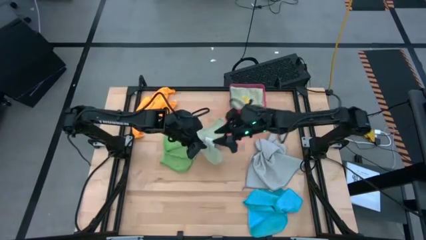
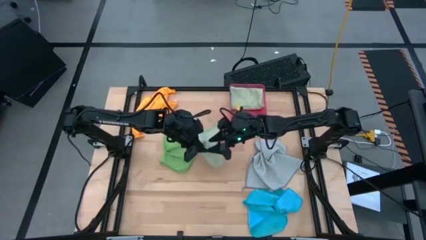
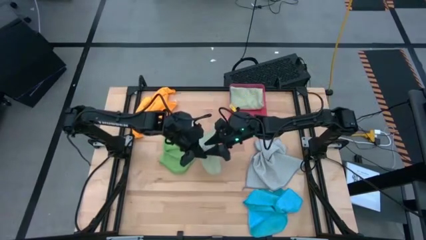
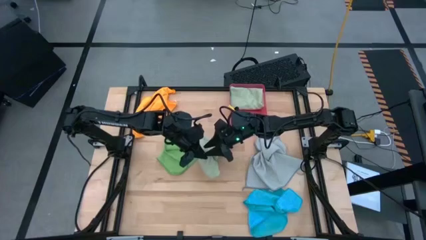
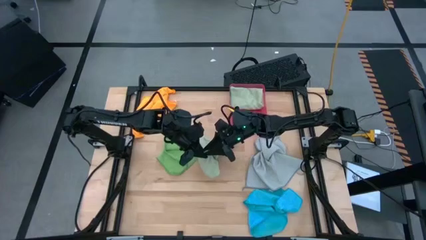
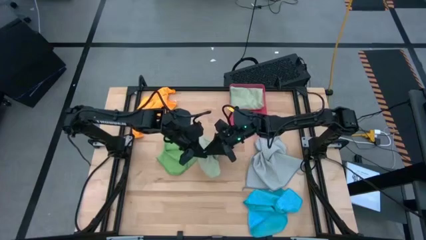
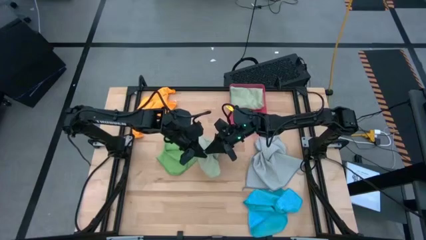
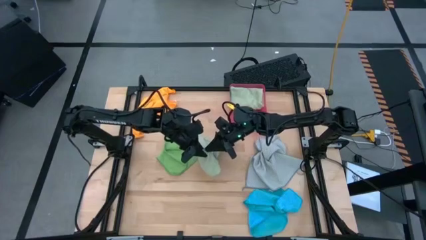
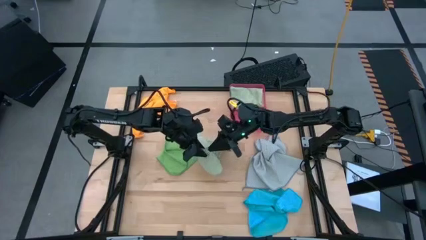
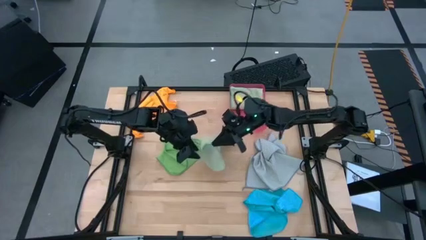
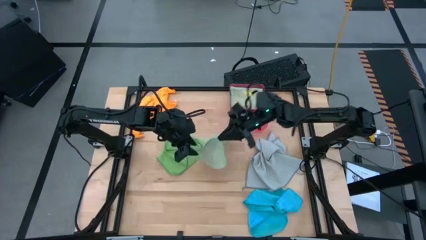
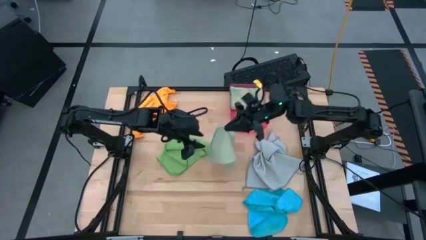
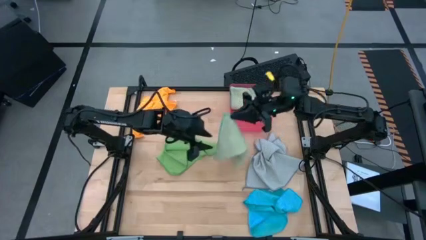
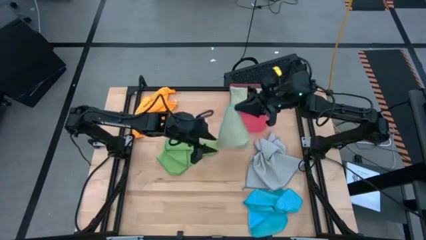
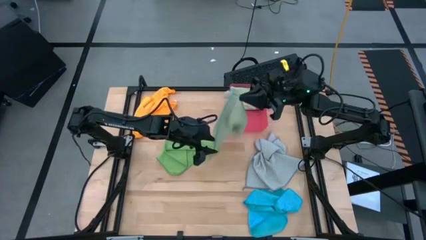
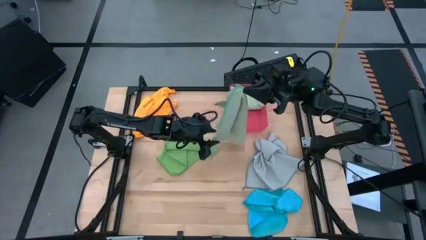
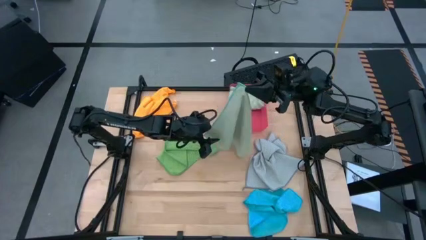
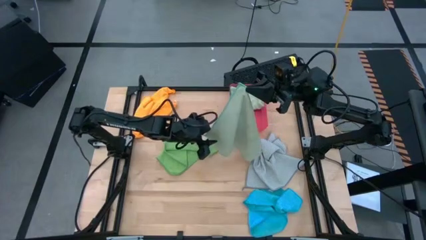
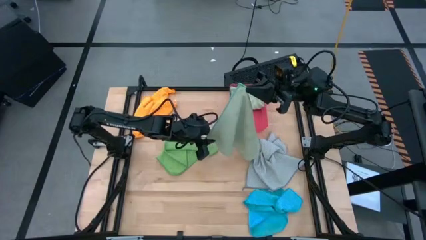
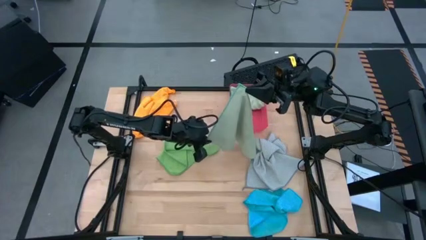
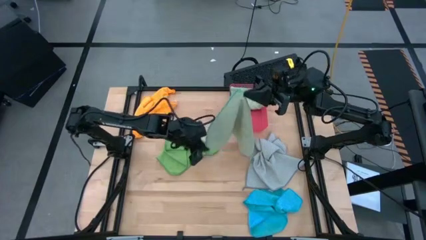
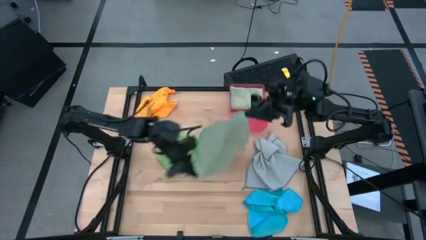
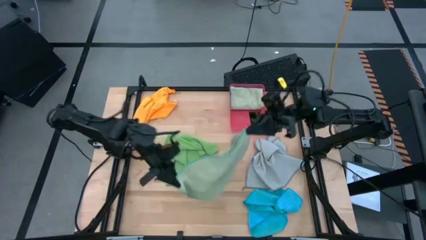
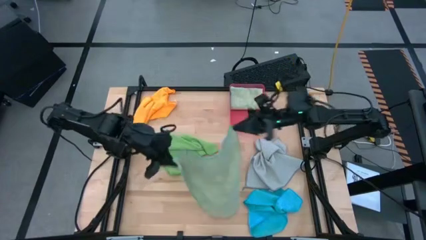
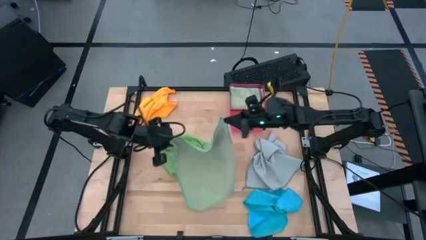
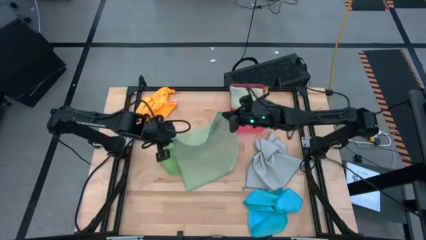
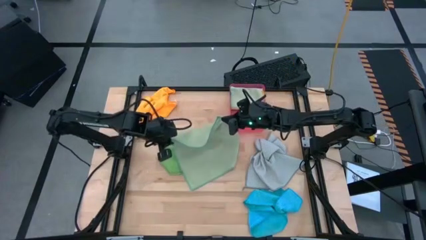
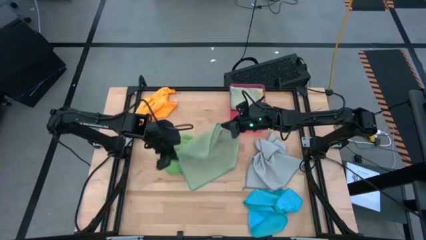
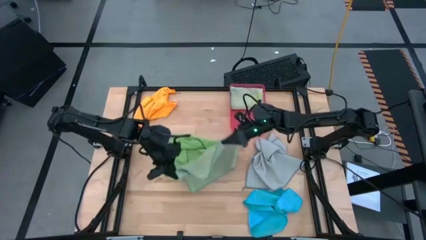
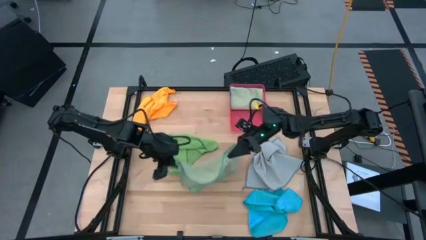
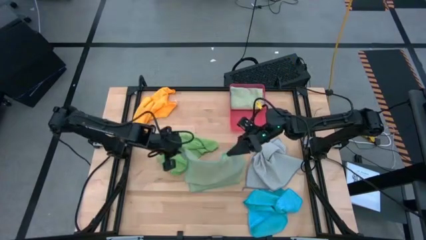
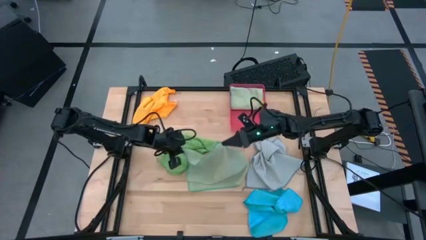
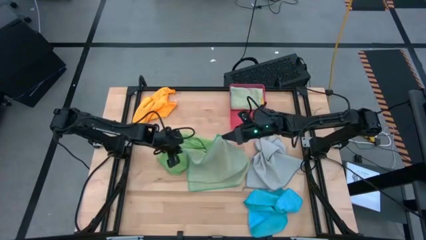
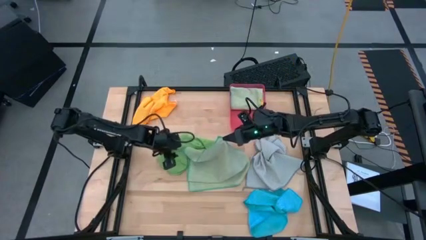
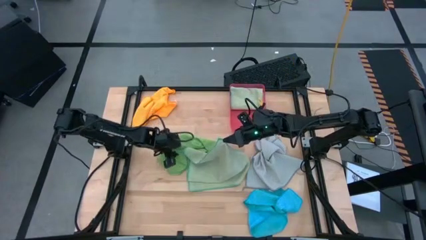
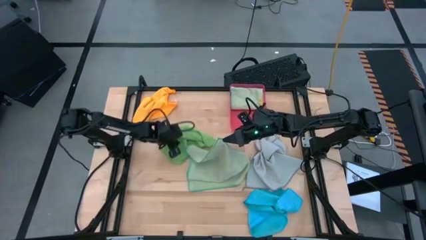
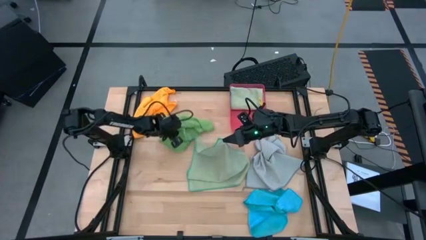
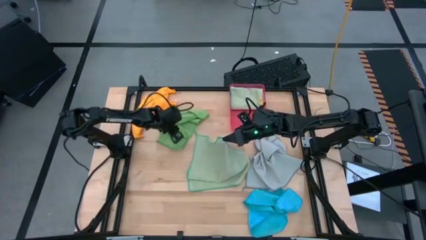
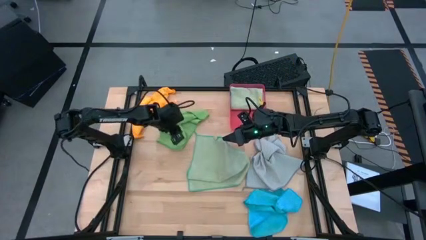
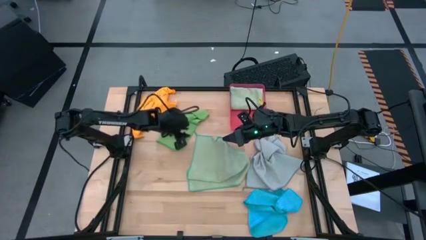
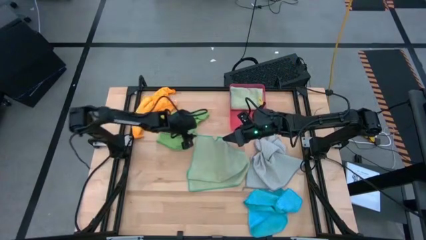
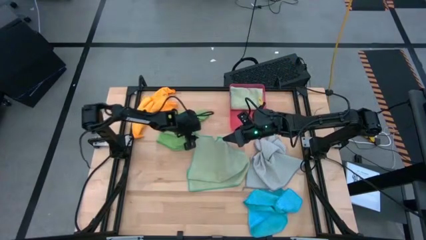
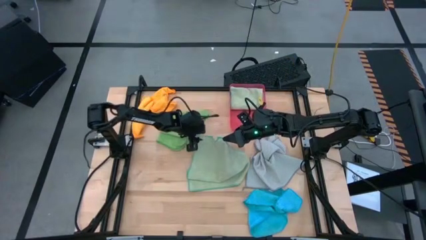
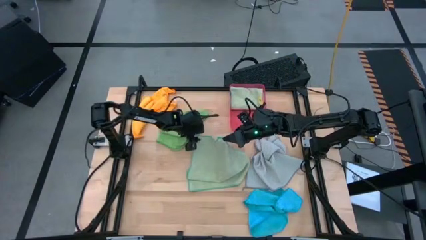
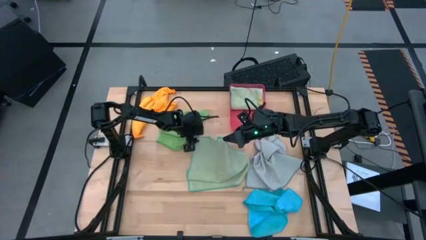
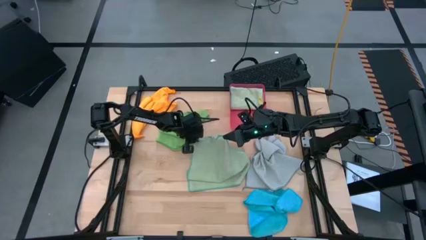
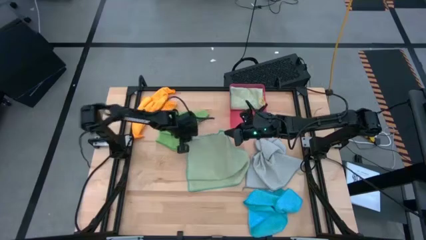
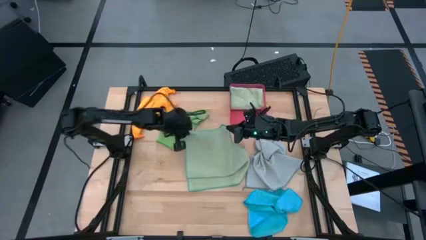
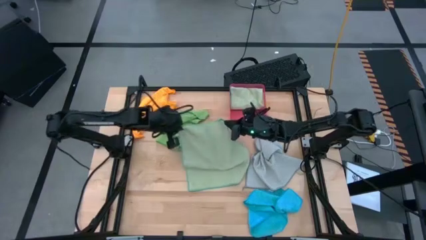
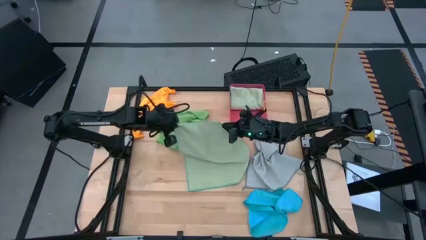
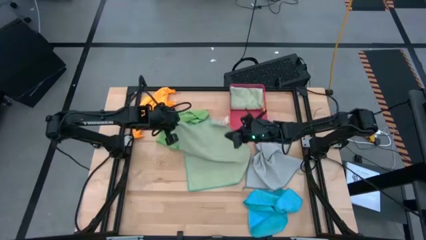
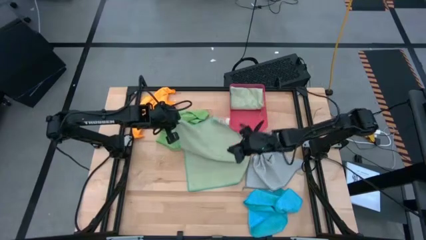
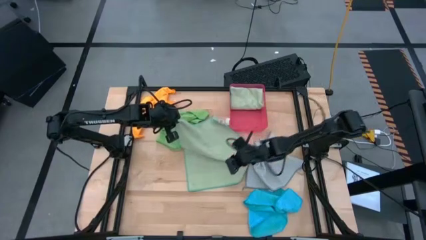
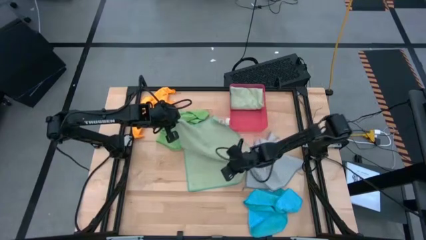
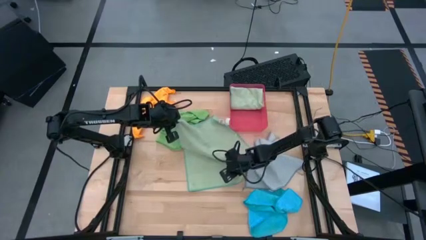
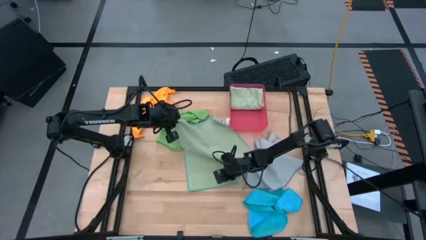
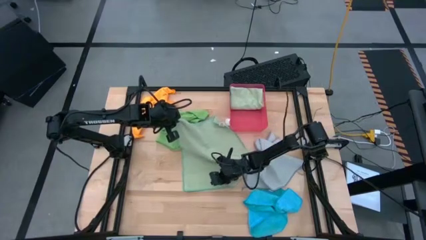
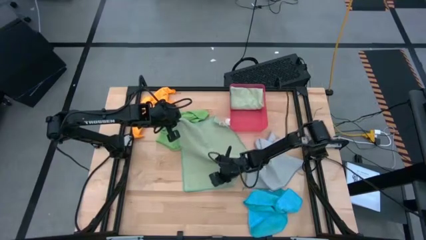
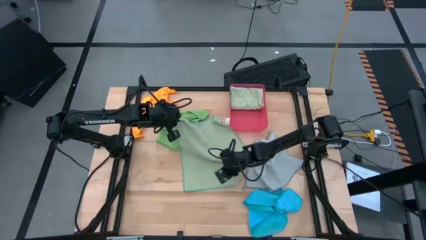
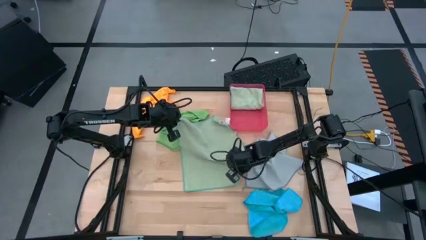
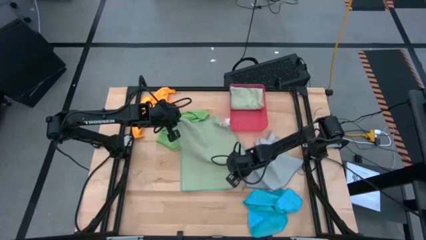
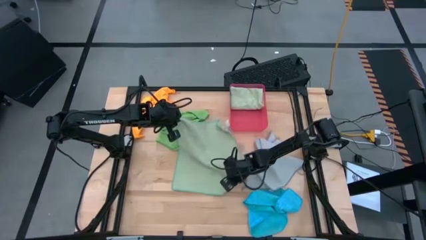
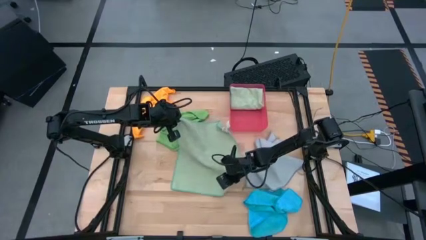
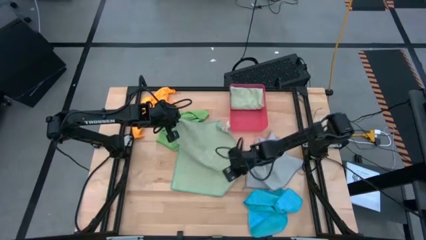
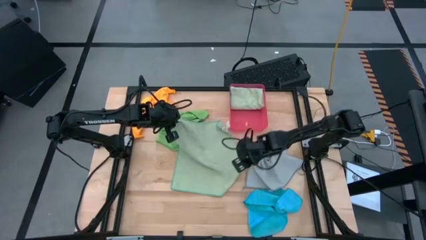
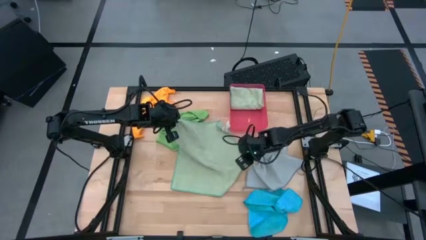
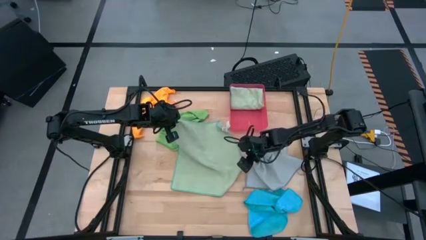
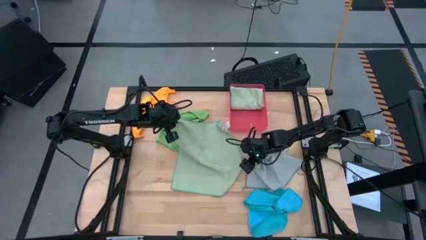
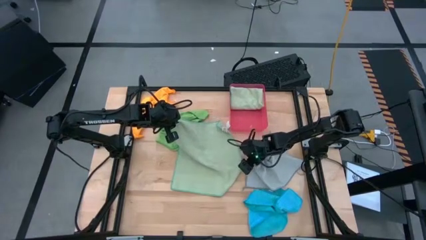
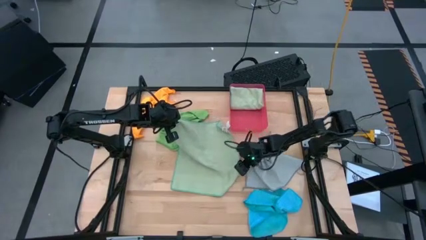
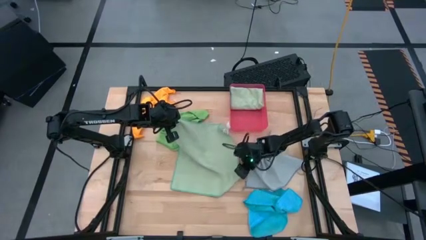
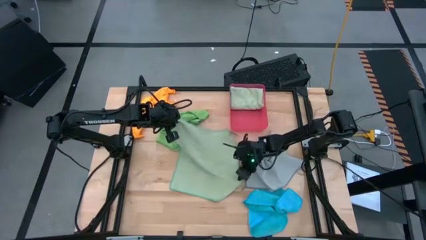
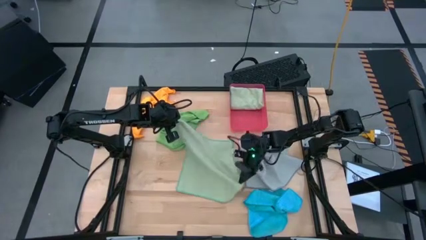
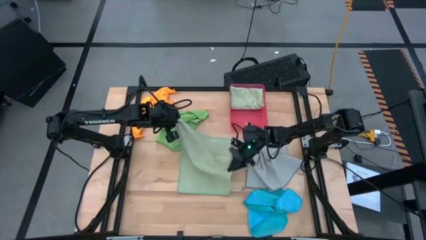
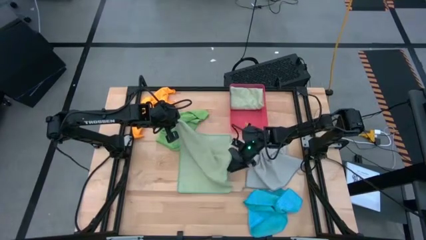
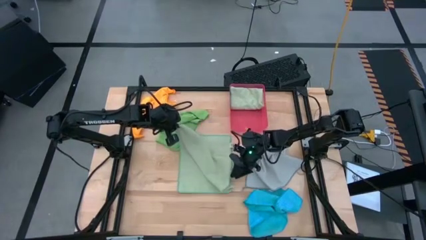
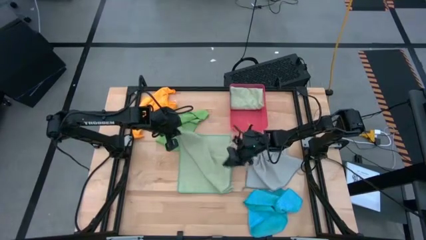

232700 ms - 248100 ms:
Task: Fold microfiber towels
Fold the light green microfiber cloth
